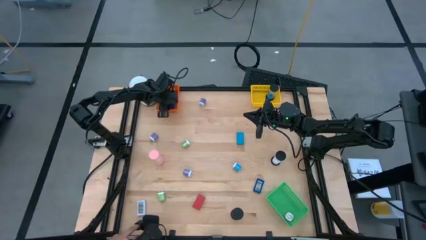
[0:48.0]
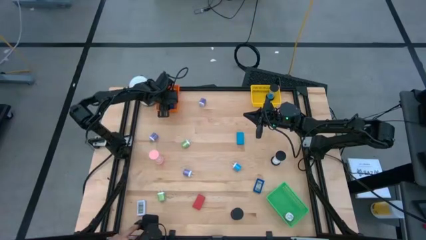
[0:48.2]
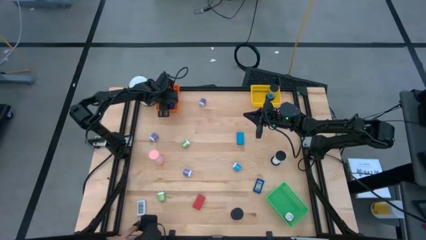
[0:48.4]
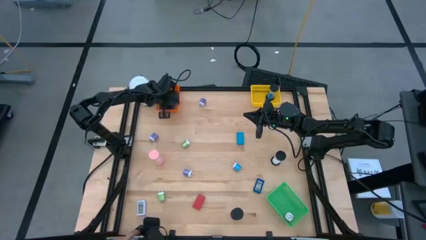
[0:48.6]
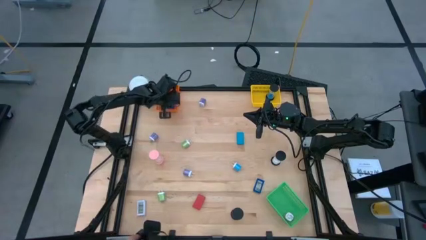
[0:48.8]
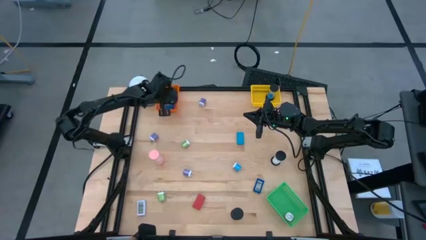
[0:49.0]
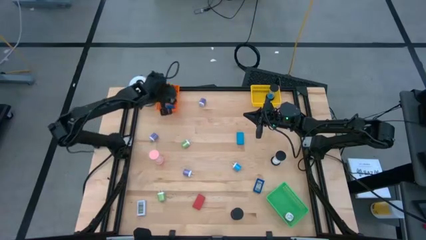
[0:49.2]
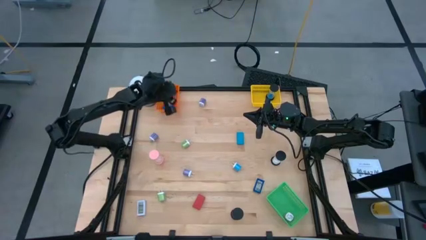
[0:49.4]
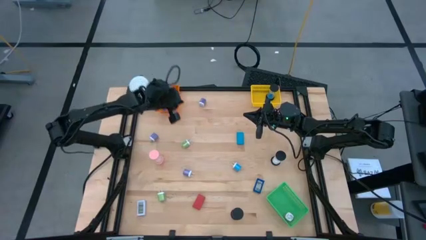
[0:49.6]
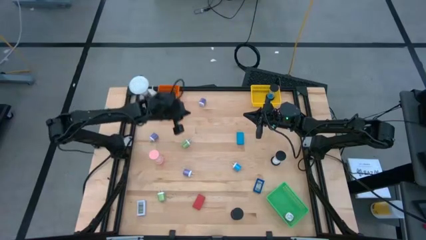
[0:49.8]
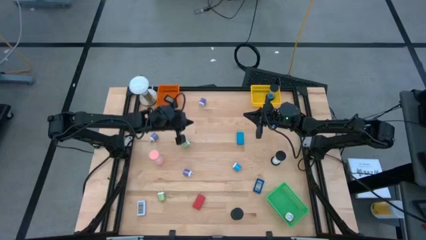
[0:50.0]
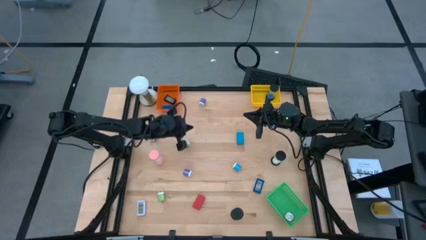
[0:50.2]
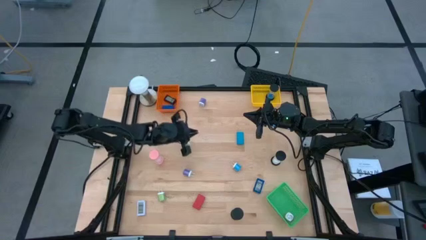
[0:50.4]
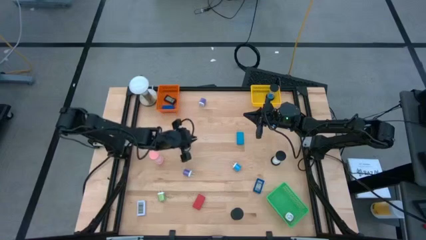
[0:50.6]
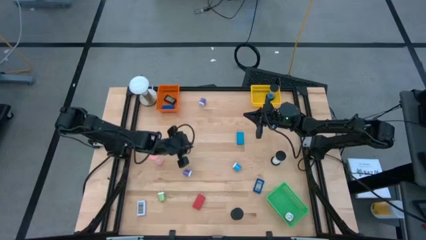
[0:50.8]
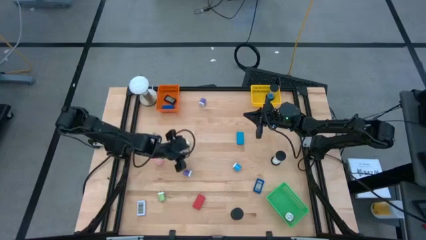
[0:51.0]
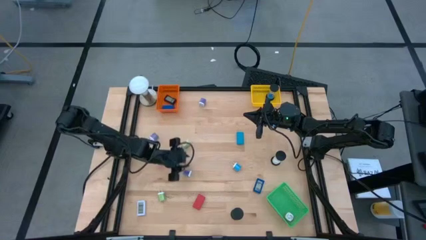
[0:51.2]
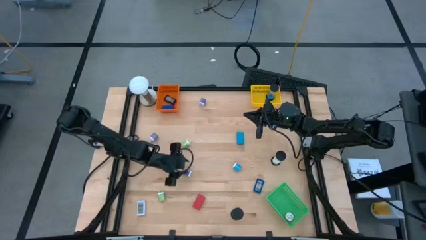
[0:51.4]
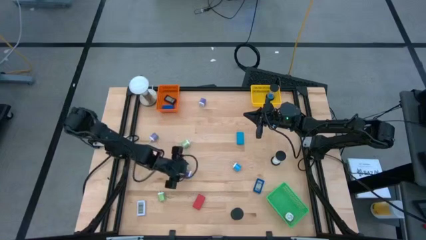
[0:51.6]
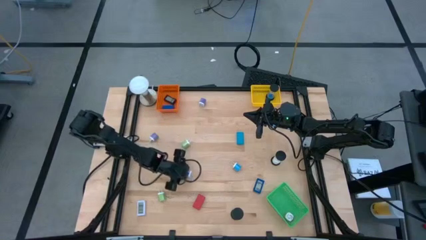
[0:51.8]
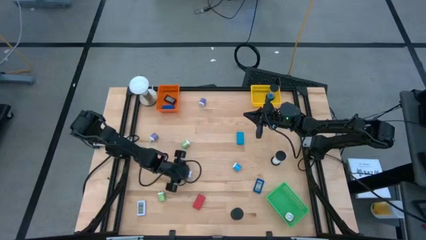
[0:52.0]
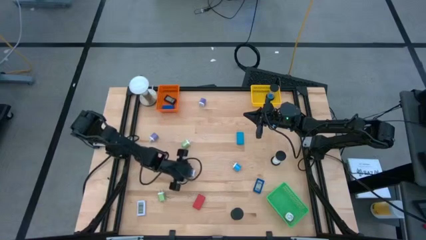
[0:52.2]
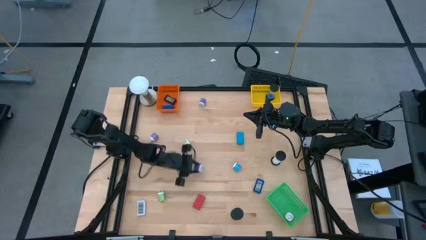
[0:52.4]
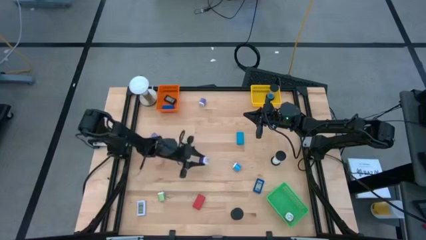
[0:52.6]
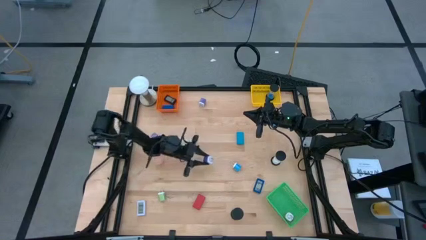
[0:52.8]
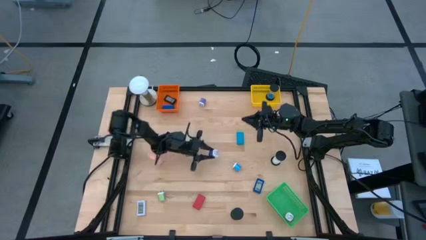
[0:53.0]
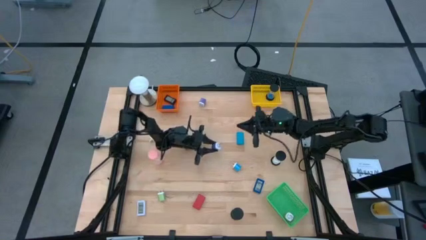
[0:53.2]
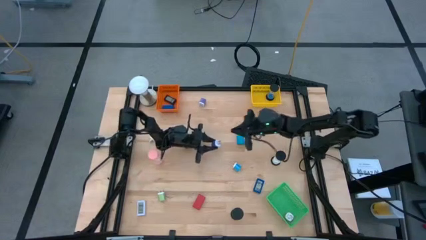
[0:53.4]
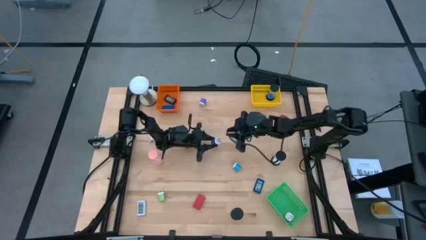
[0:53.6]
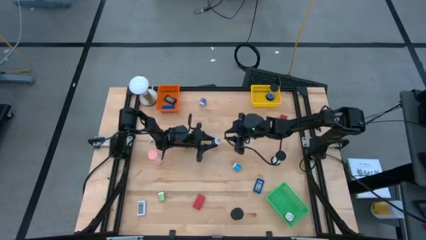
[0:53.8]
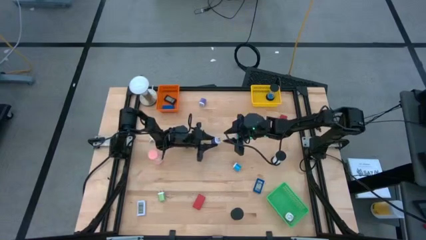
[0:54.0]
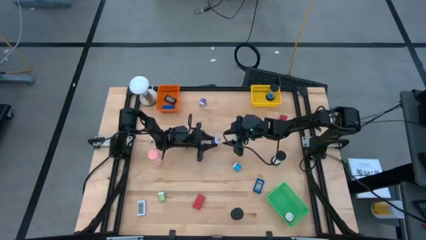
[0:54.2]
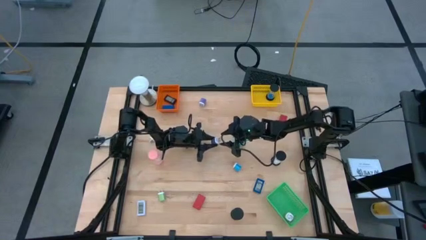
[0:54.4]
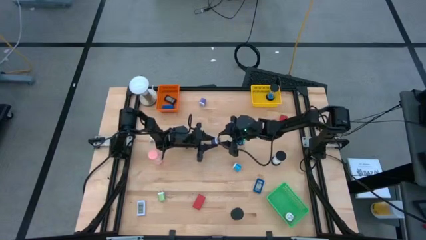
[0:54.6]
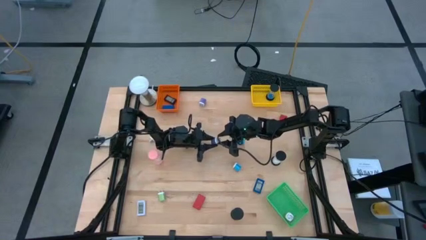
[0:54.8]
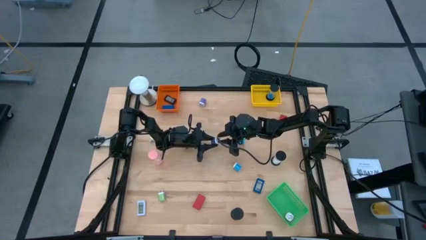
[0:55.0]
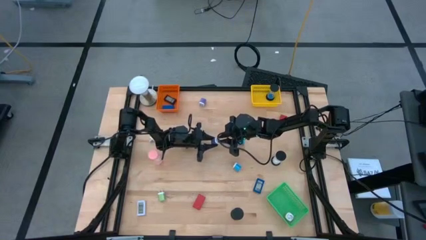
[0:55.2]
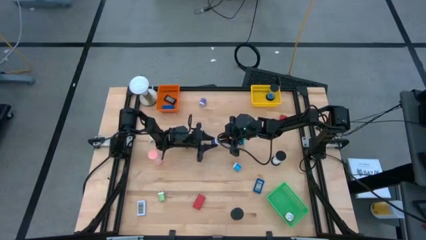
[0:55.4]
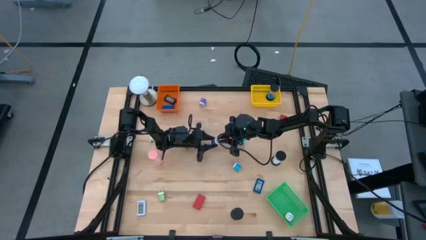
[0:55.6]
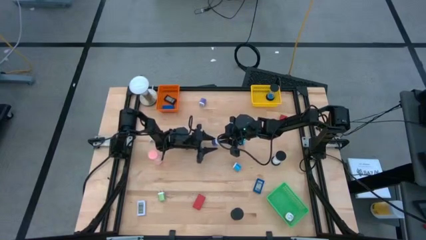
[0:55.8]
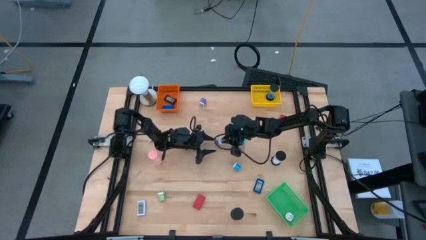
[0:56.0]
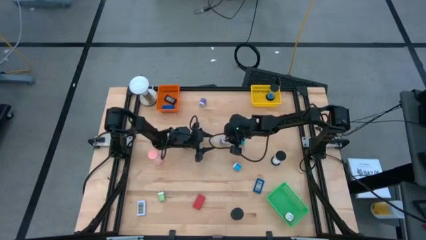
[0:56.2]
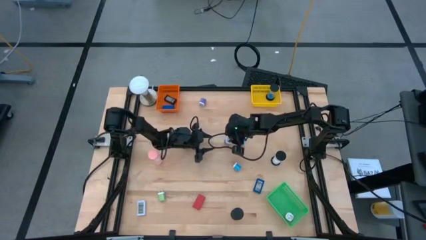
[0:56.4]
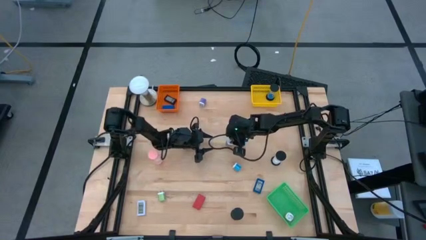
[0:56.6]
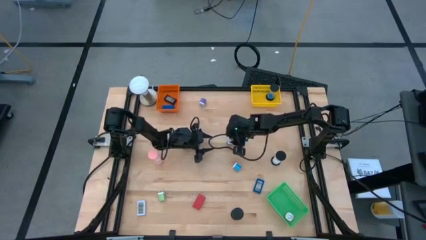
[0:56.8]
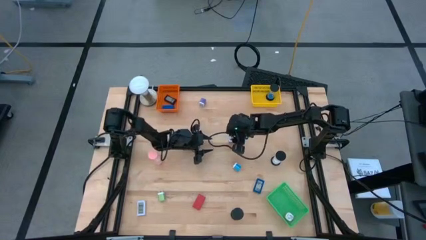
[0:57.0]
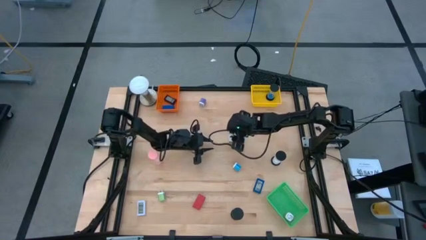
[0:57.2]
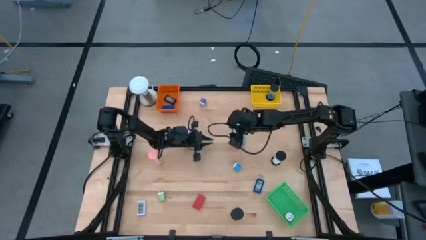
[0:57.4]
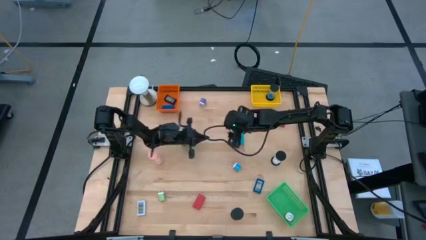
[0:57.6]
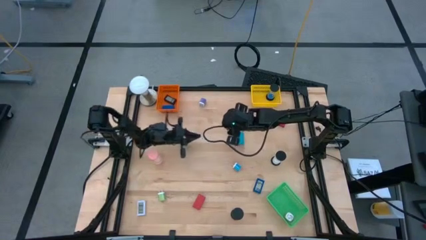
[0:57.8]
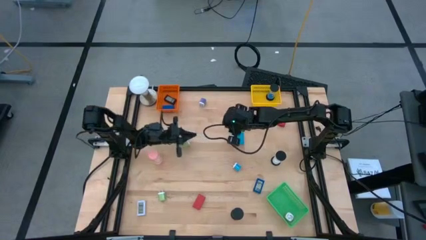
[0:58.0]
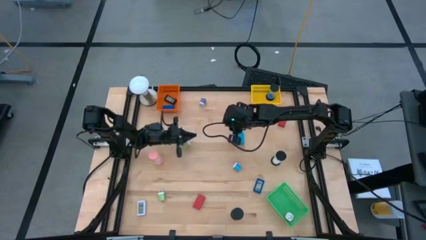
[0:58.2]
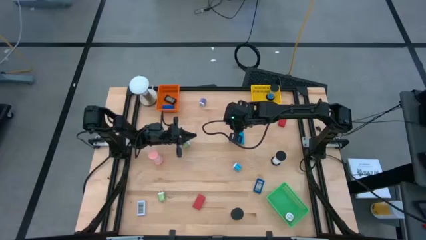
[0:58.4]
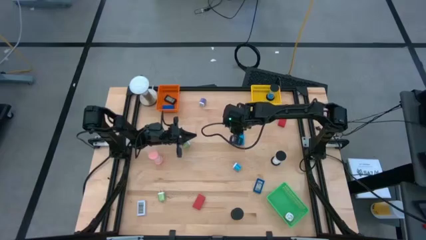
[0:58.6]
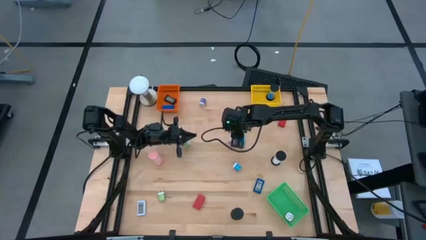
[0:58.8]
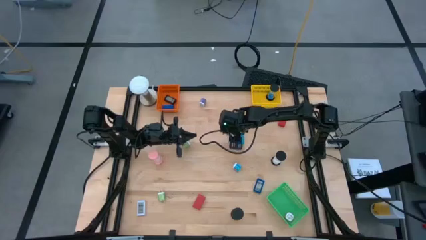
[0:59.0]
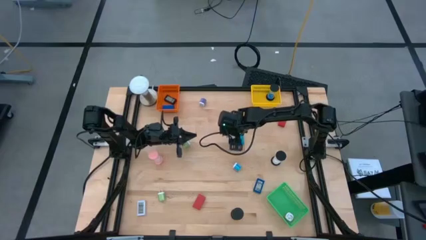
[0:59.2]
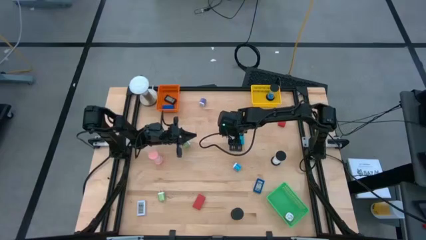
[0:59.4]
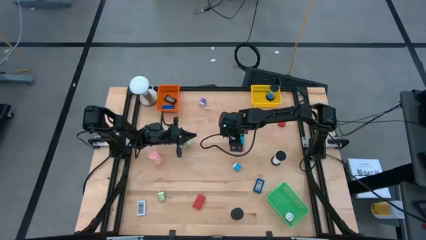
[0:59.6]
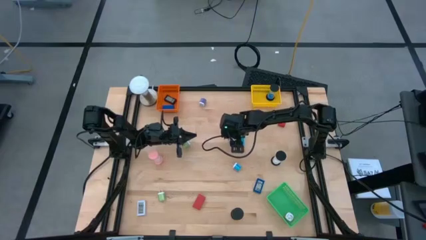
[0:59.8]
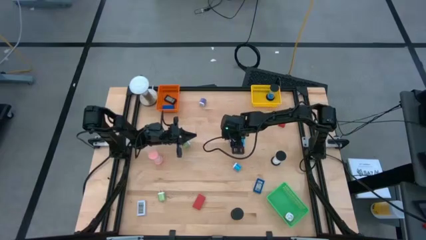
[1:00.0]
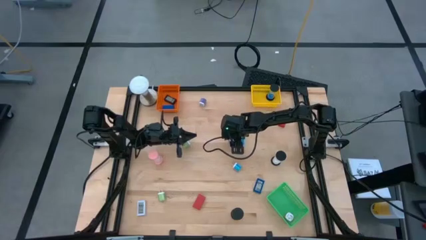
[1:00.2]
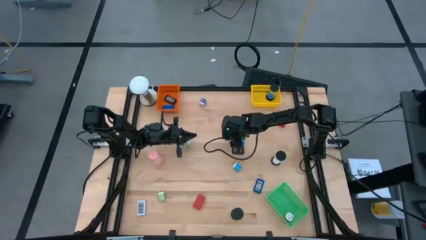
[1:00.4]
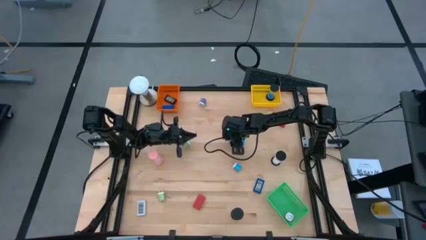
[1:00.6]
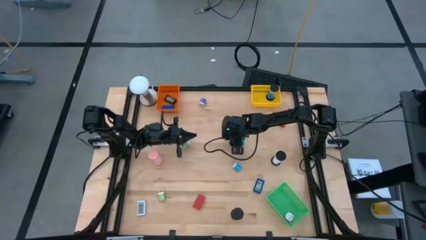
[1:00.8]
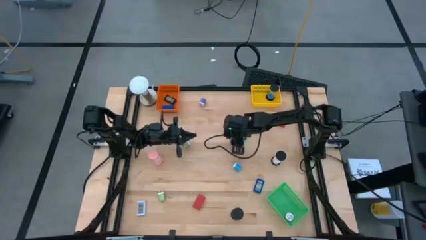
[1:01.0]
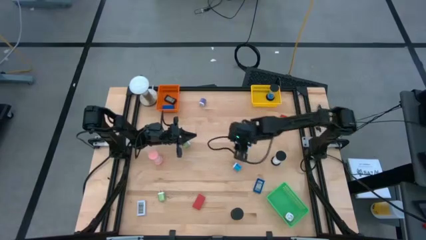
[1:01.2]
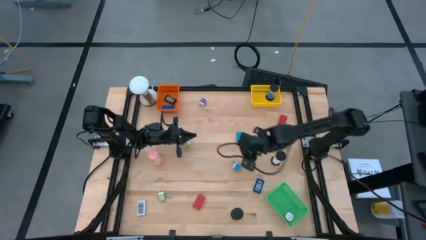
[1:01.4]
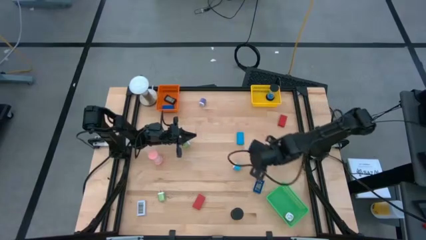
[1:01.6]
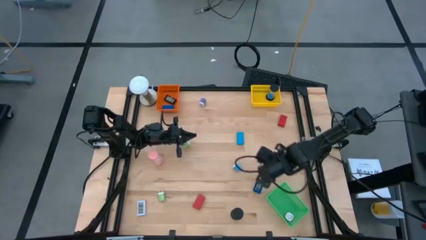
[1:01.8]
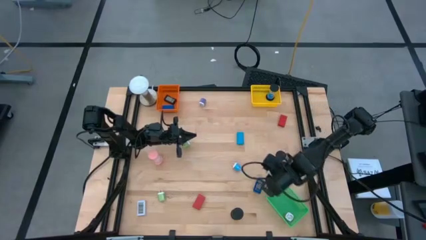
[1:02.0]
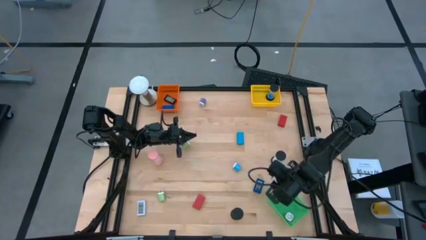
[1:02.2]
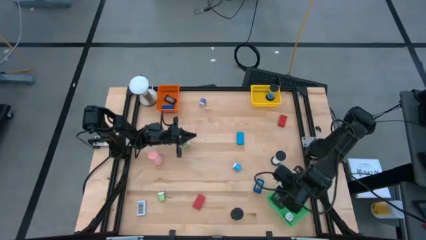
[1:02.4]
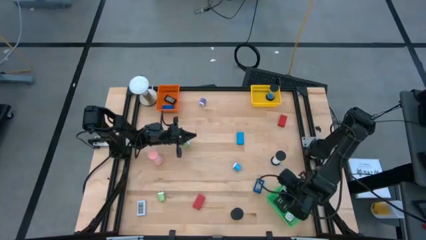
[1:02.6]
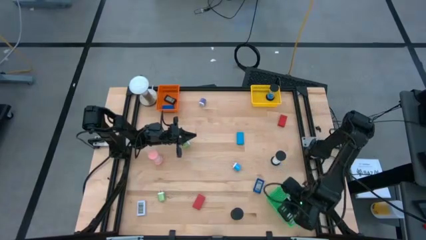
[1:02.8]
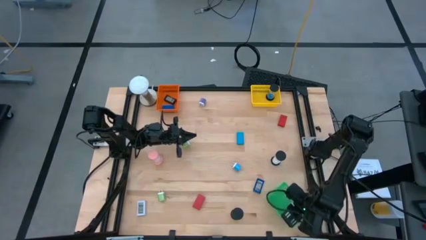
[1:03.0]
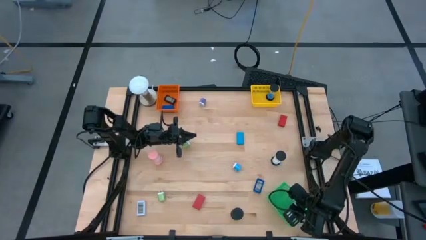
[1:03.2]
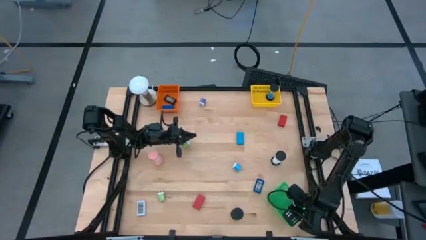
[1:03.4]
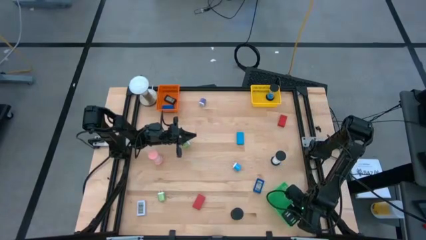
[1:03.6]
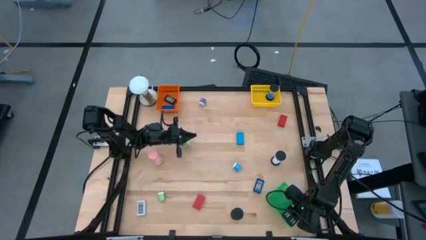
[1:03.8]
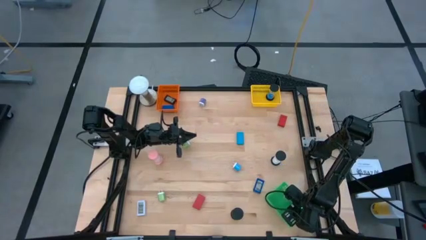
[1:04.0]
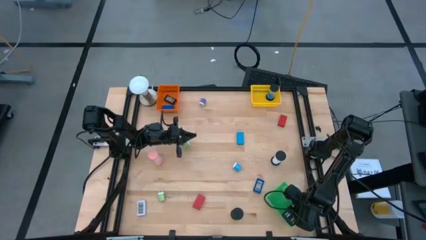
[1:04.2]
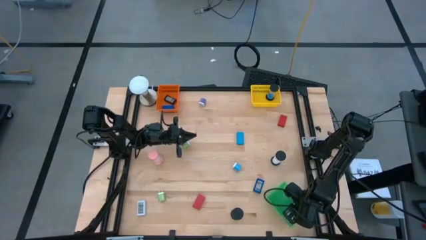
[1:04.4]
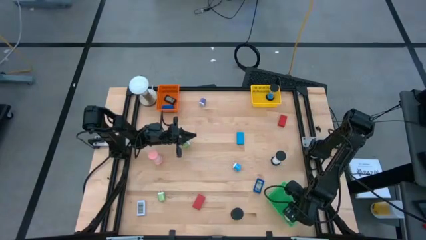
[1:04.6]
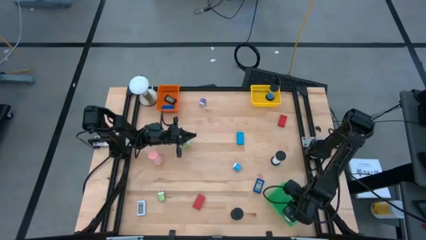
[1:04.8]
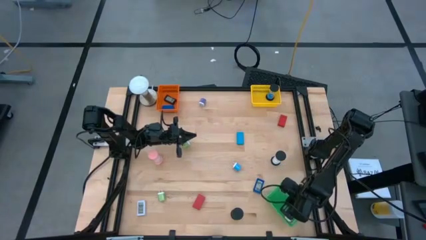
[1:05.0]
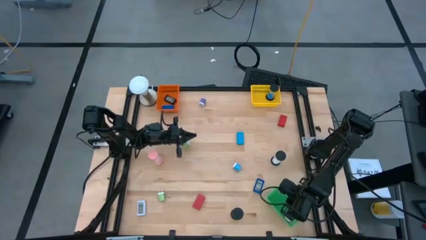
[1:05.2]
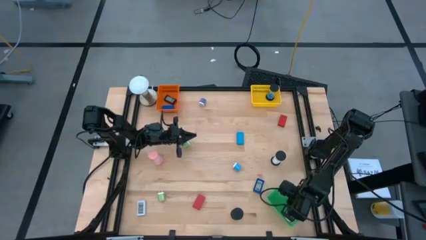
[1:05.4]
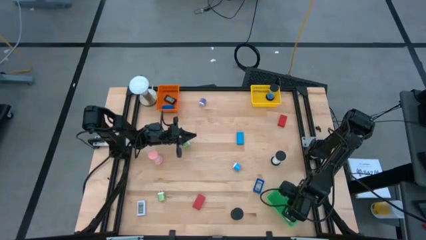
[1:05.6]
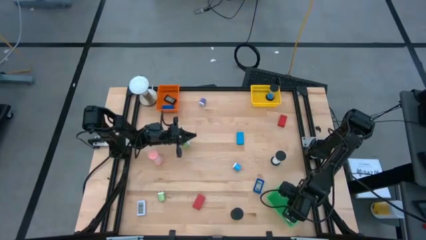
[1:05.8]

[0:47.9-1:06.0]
Task: Pick & Place Office items
Put the bottom violet charger adapter into the green bin
